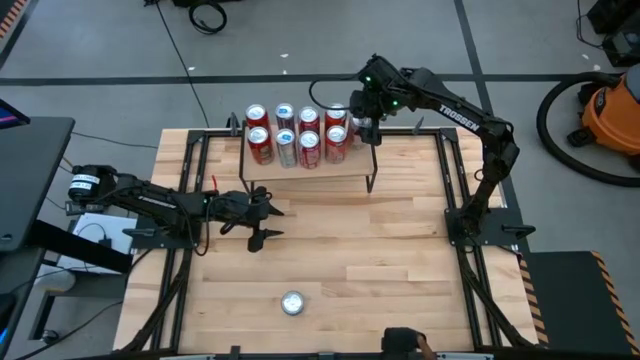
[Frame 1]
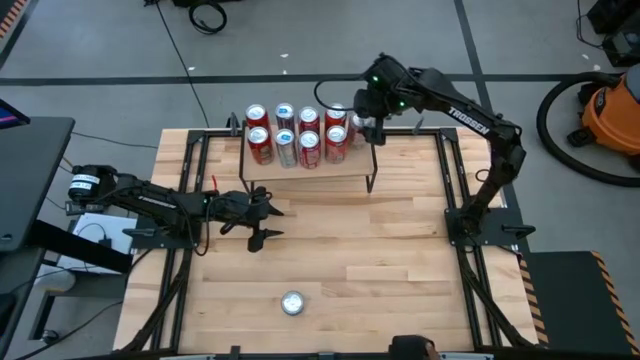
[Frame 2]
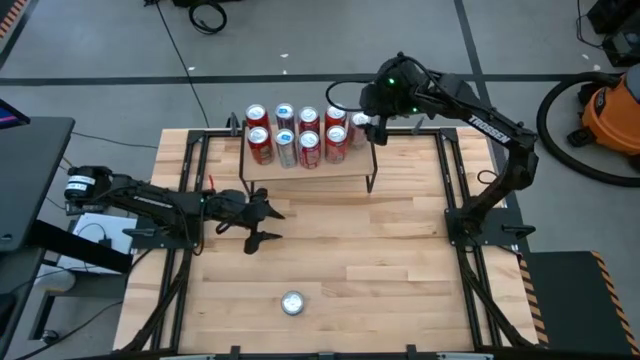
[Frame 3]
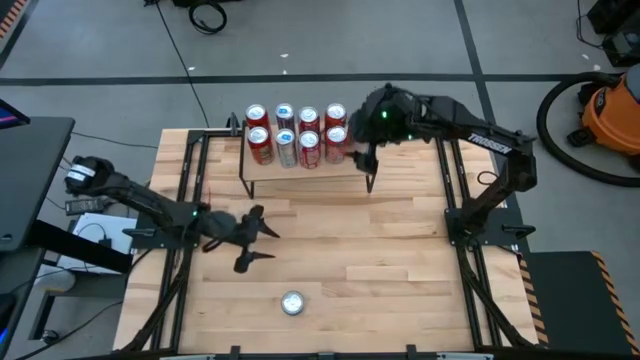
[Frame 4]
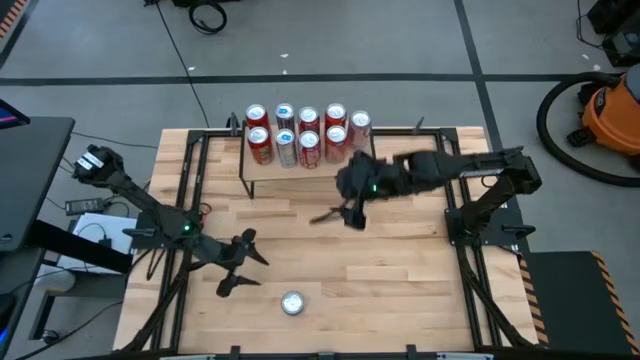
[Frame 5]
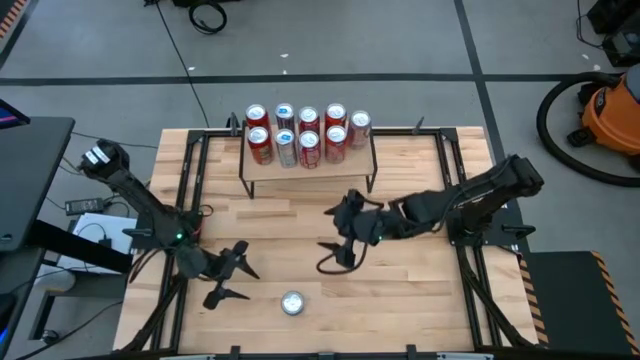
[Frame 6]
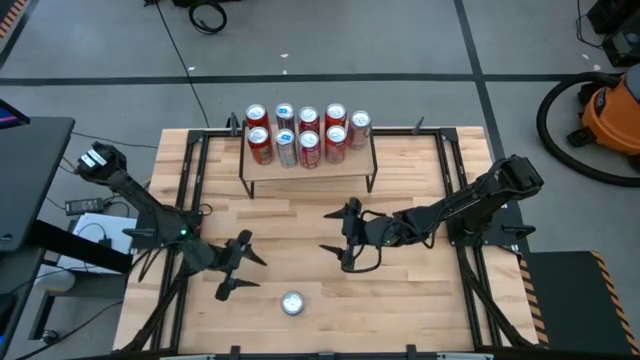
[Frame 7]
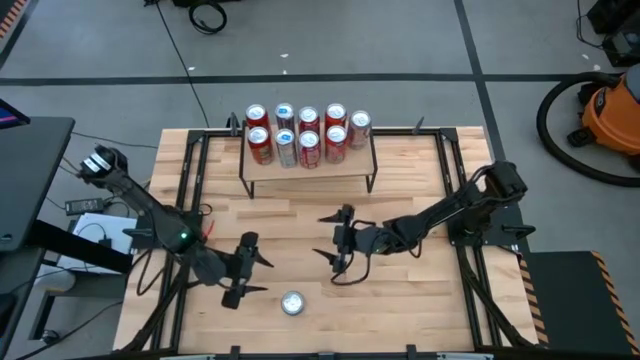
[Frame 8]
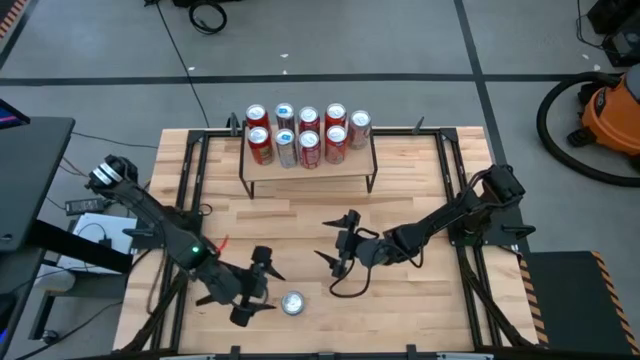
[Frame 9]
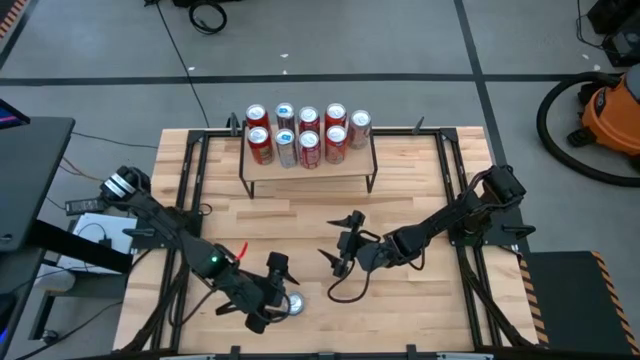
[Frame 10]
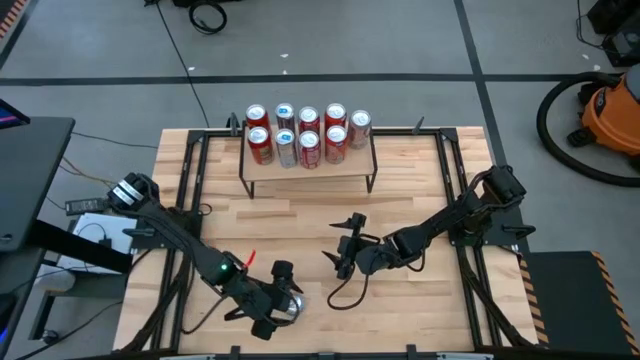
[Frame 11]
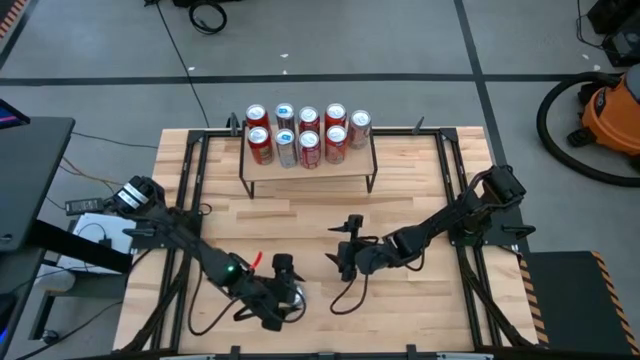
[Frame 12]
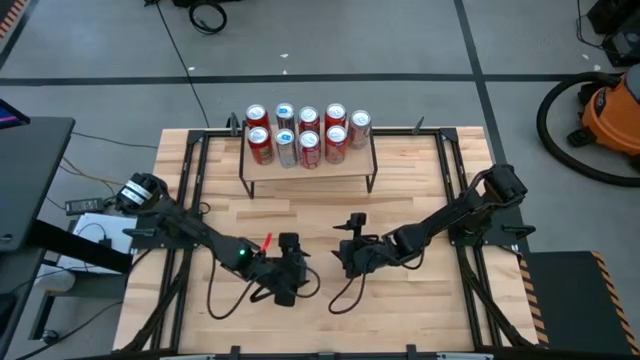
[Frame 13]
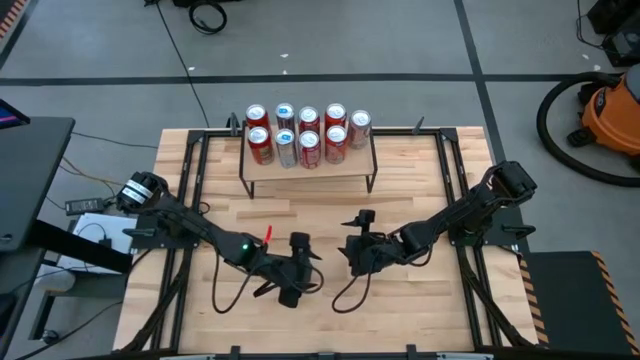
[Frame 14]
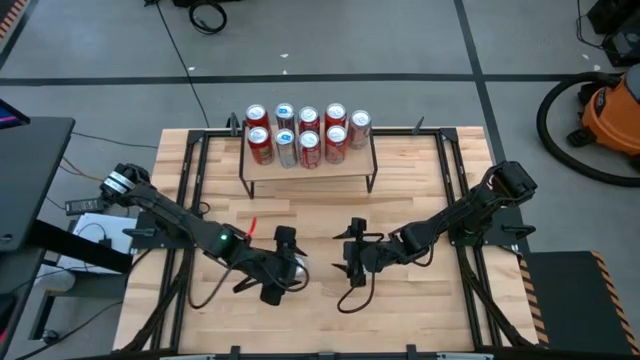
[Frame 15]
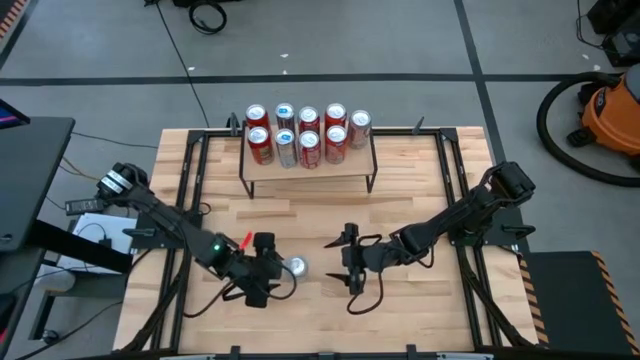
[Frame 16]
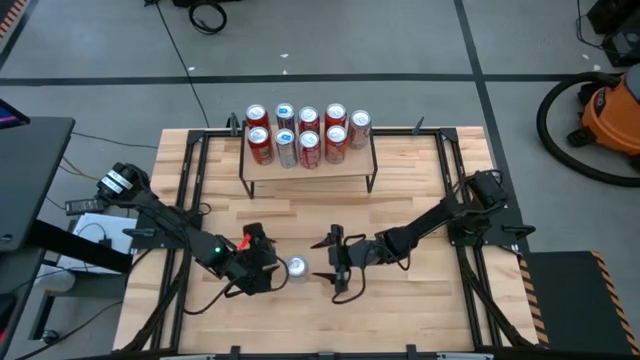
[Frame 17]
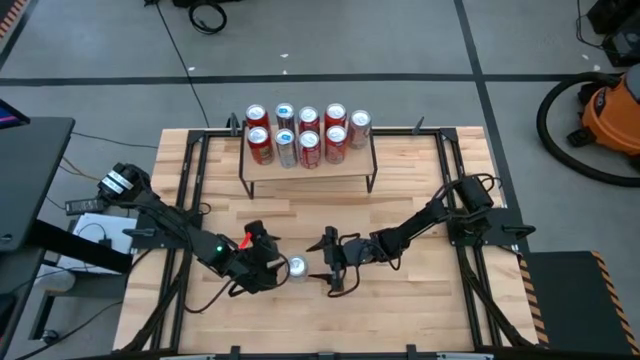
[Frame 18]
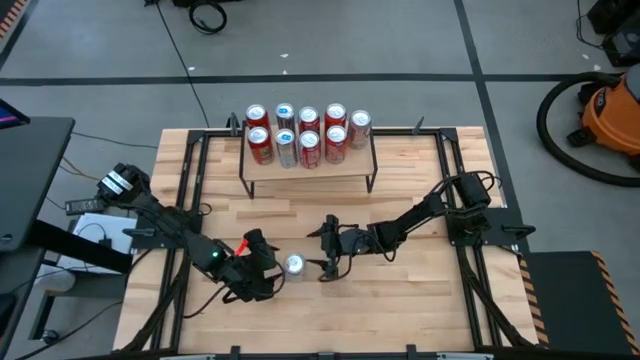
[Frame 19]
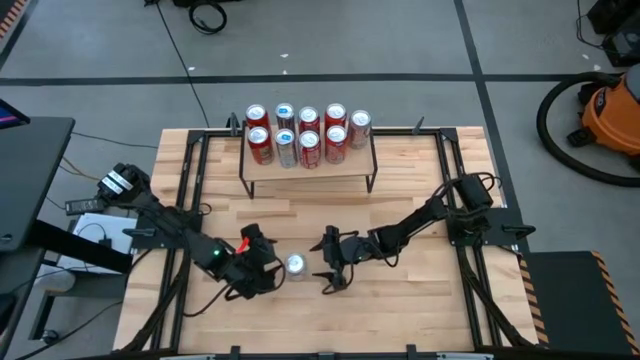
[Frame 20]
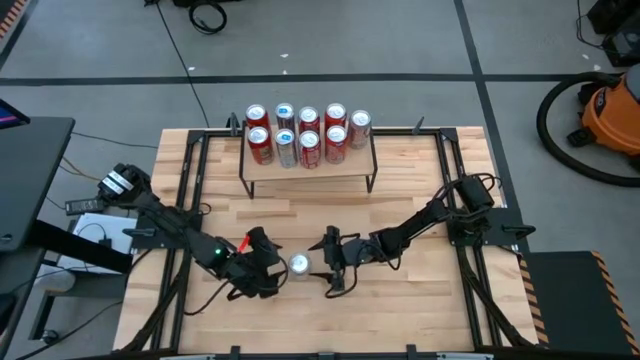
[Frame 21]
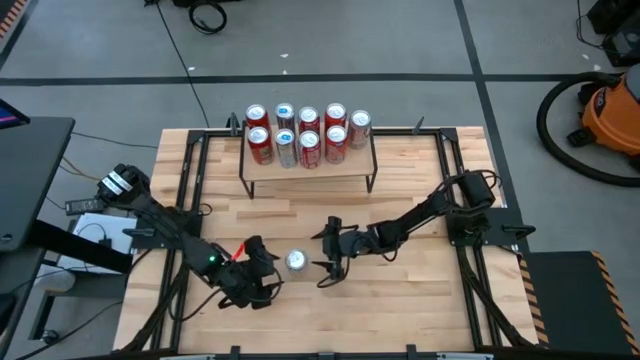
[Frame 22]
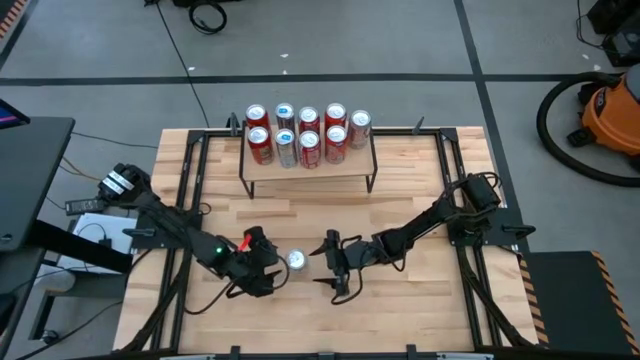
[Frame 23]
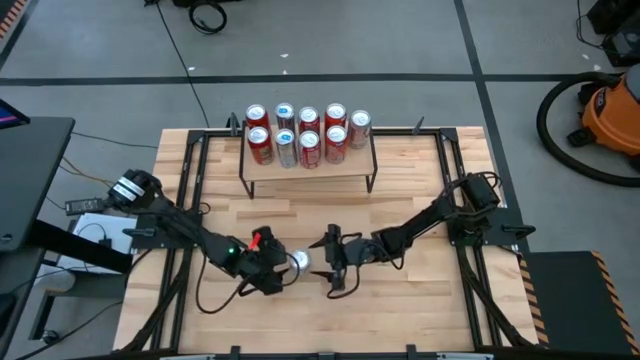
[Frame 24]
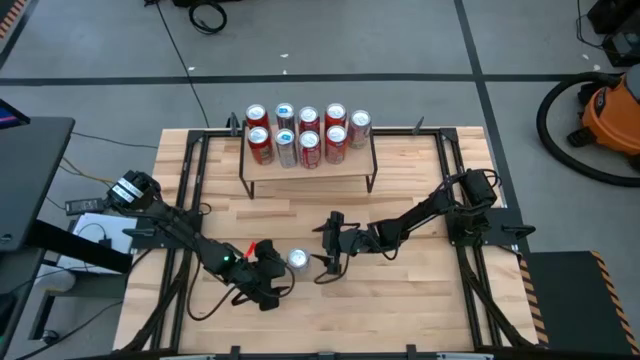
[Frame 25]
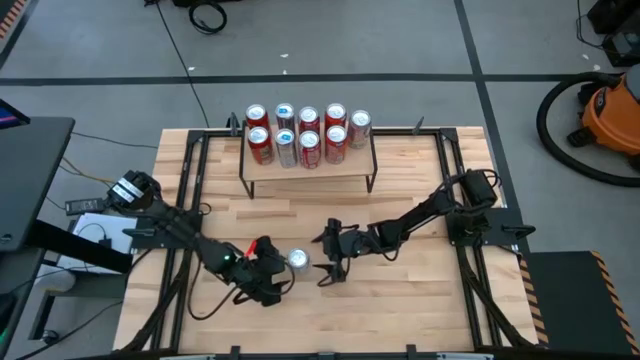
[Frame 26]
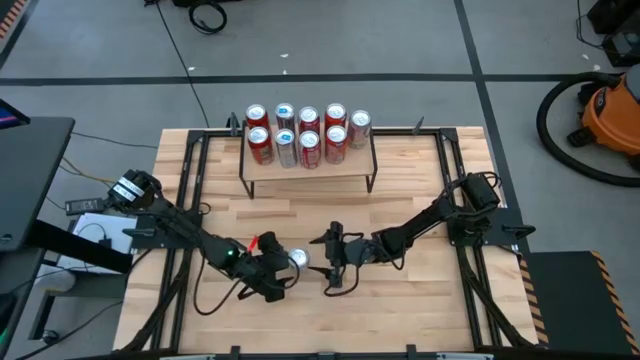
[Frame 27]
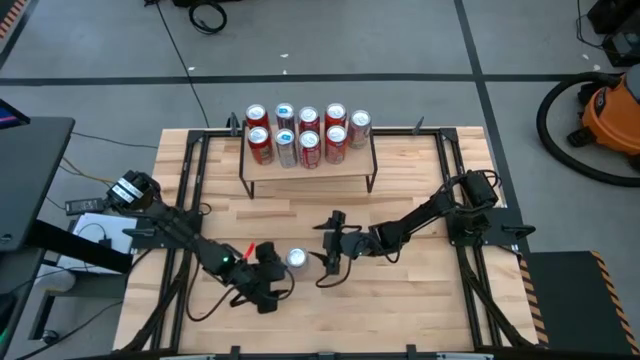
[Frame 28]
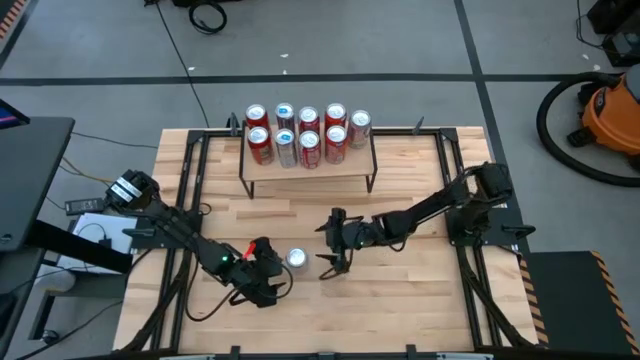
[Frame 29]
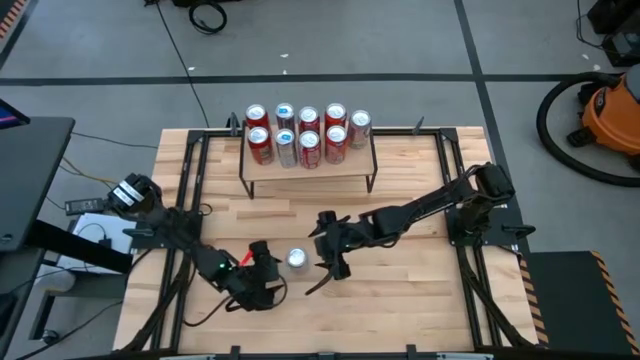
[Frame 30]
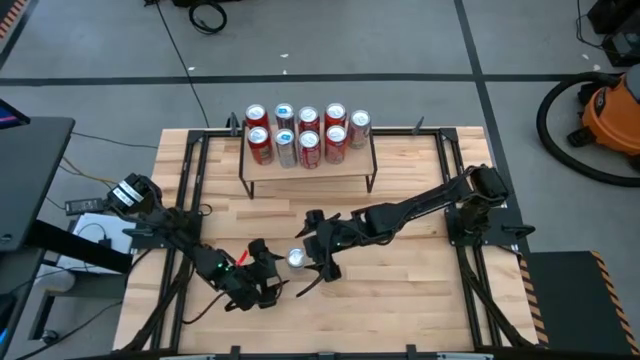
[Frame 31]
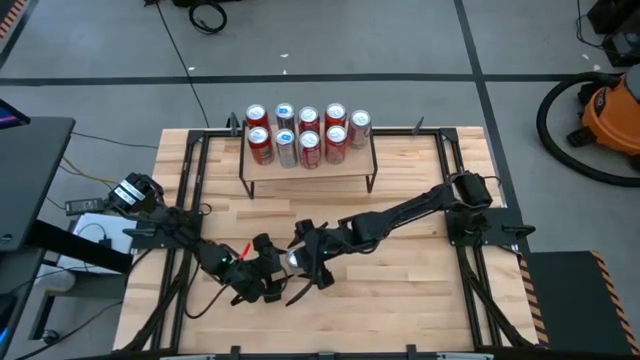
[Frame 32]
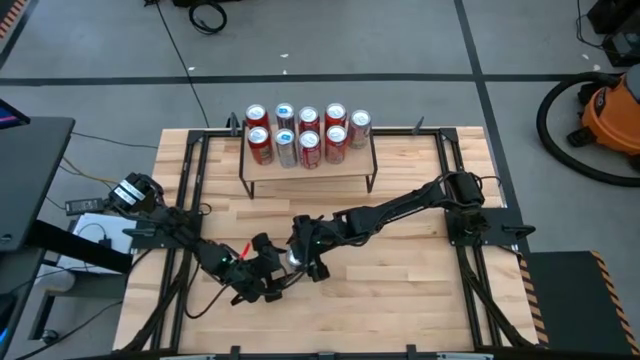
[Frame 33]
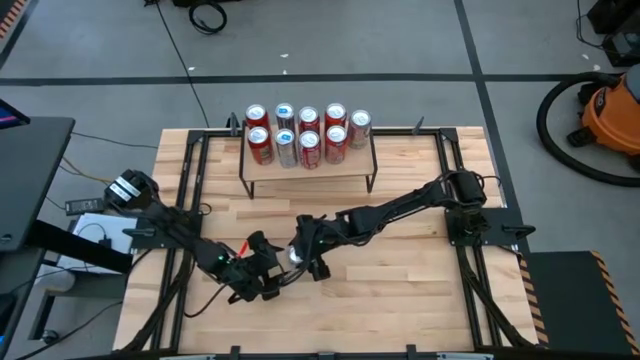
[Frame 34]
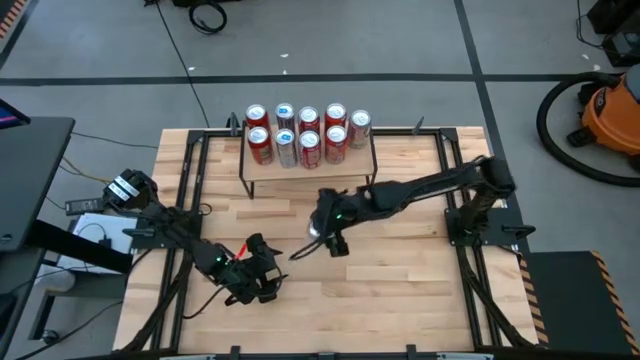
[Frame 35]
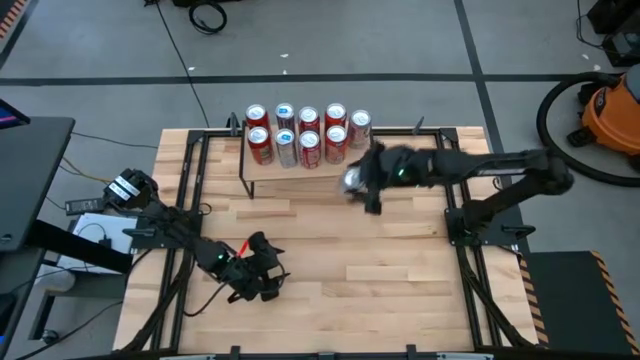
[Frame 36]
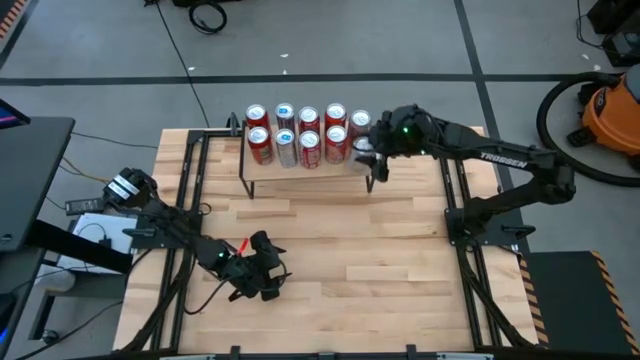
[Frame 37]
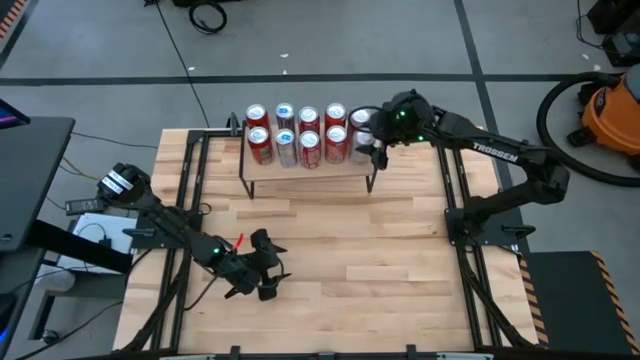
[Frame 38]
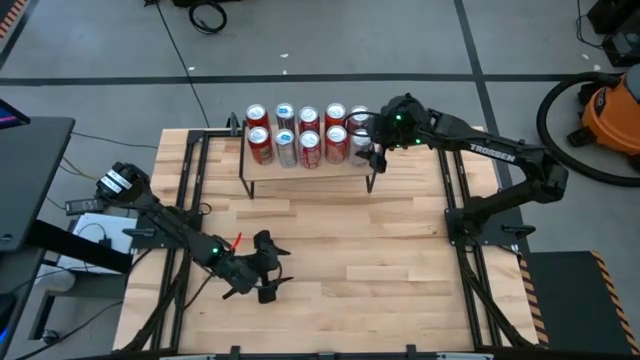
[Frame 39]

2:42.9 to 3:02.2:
Task: Place canned beverage on shelf
Put the red silver soda can on the shelf

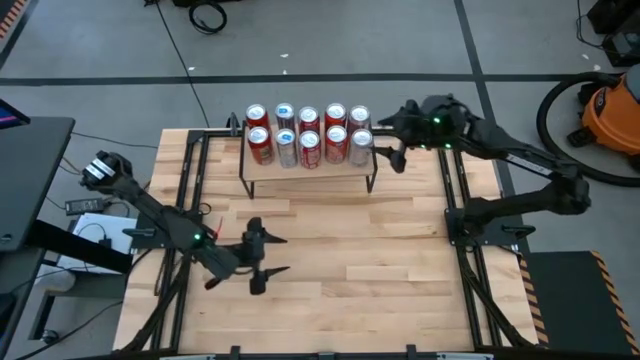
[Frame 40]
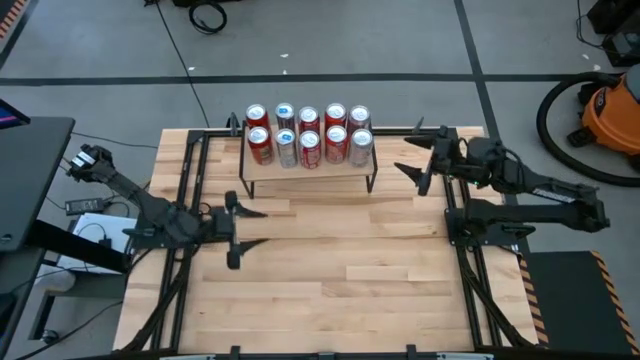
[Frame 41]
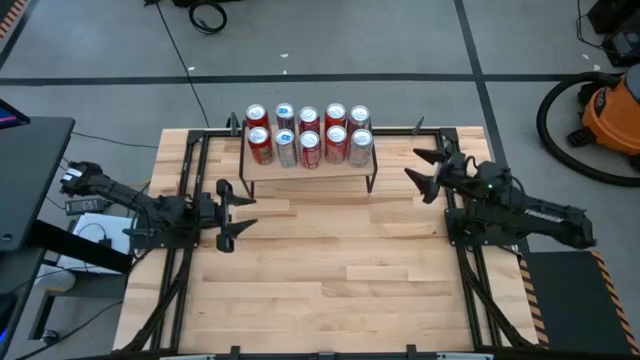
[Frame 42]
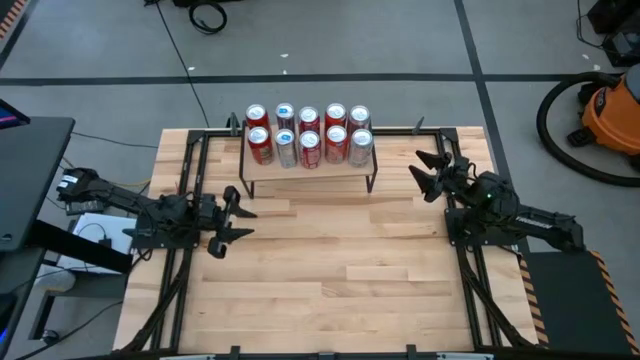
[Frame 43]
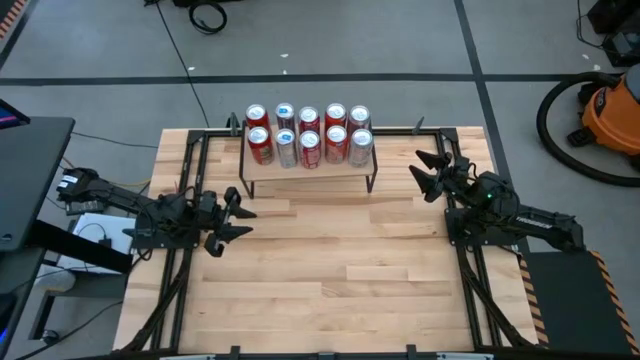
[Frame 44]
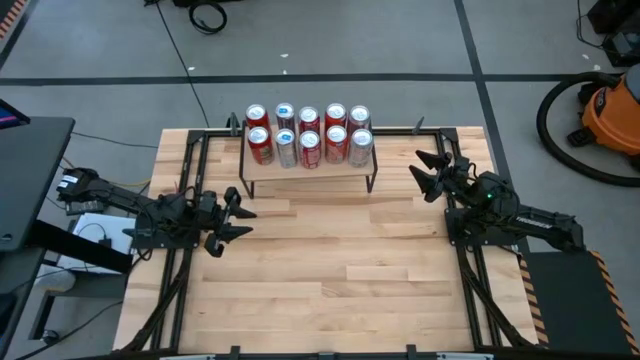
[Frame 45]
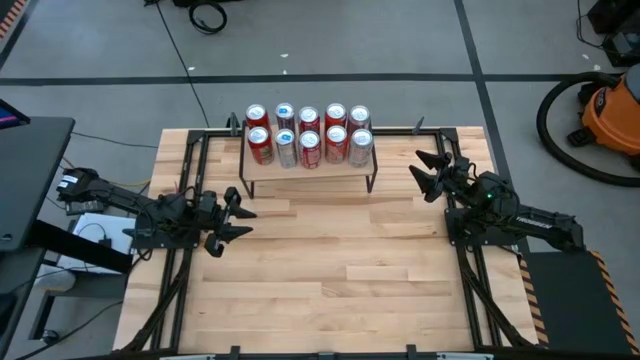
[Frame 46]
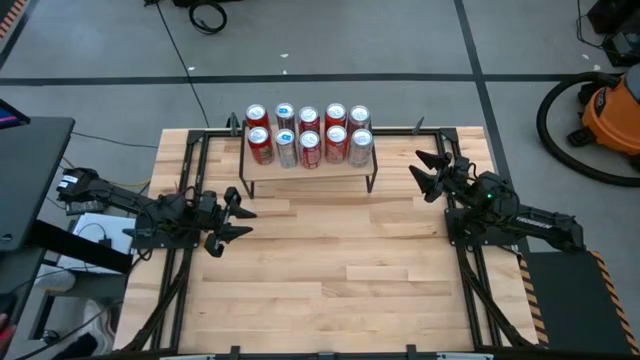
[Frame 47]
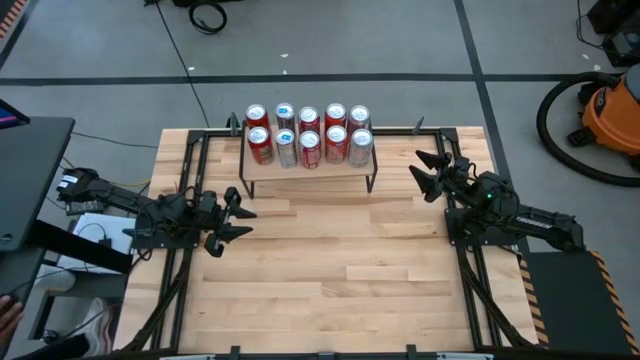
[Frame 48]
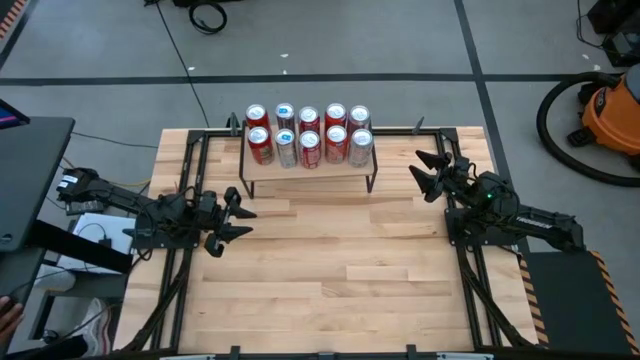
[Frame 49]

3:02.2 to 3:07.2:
Return to Home Position
